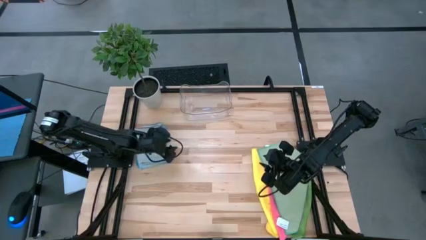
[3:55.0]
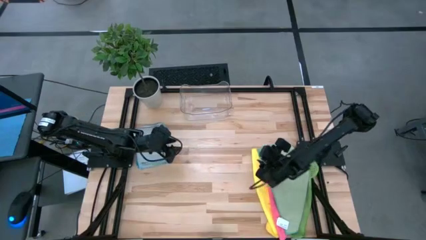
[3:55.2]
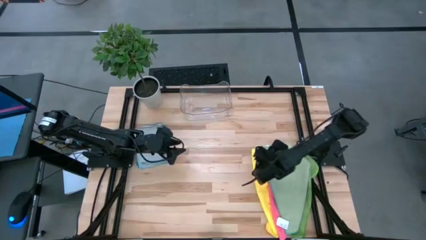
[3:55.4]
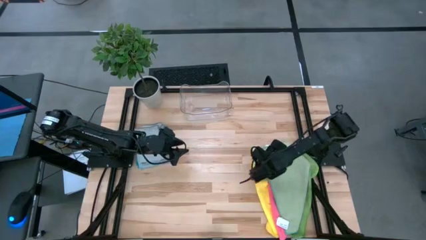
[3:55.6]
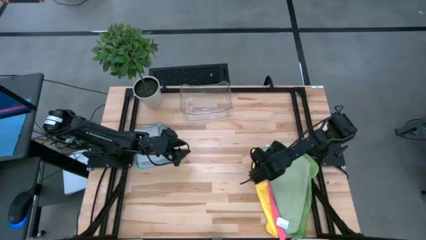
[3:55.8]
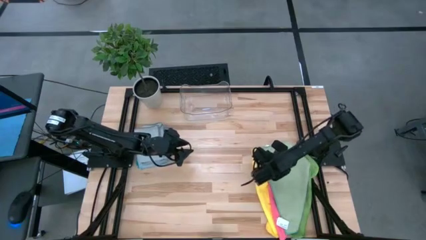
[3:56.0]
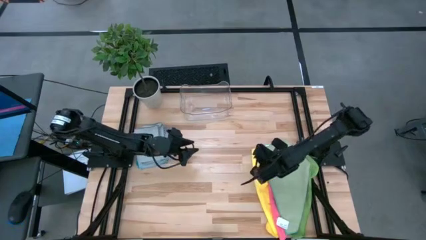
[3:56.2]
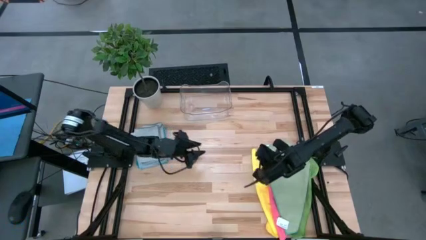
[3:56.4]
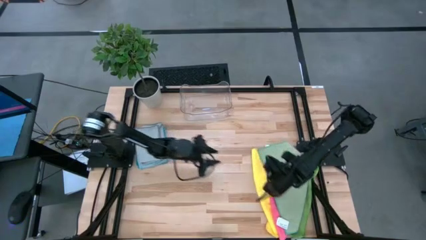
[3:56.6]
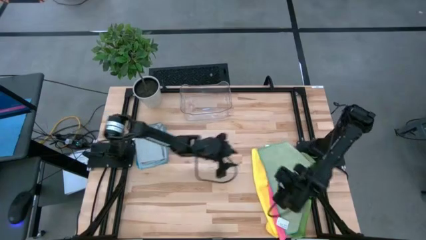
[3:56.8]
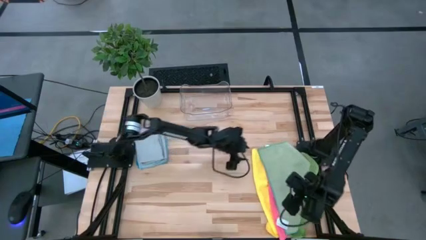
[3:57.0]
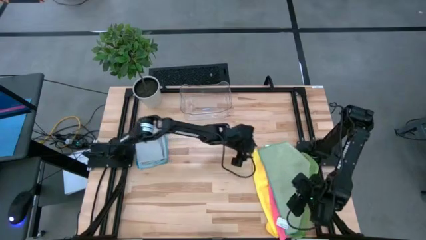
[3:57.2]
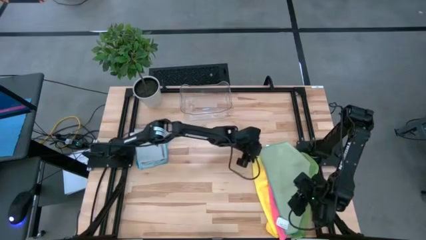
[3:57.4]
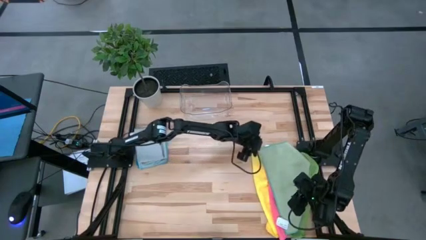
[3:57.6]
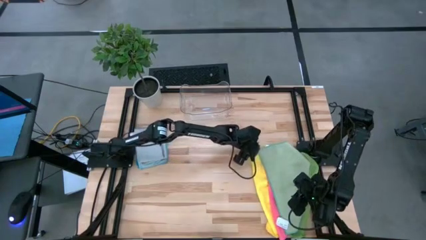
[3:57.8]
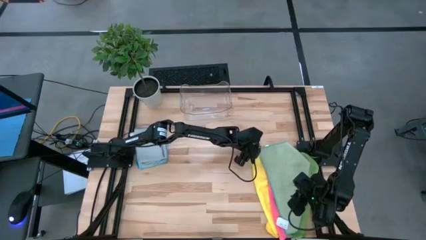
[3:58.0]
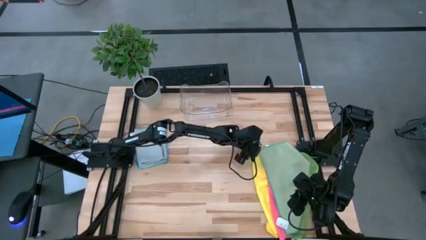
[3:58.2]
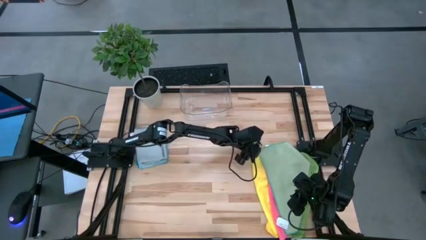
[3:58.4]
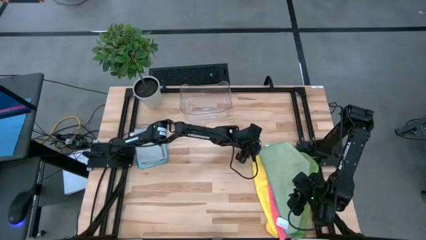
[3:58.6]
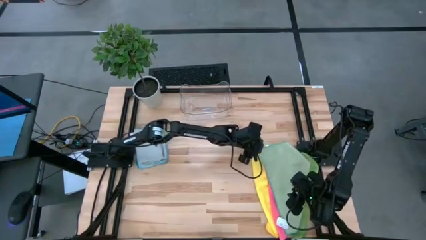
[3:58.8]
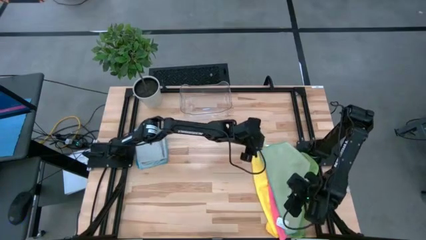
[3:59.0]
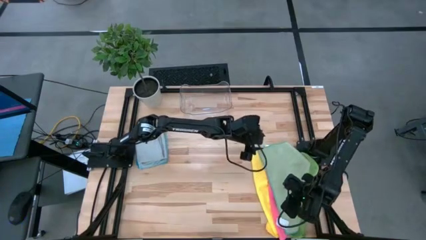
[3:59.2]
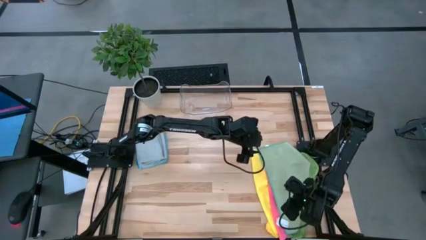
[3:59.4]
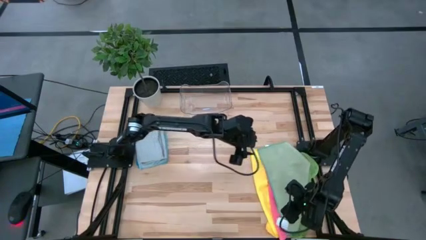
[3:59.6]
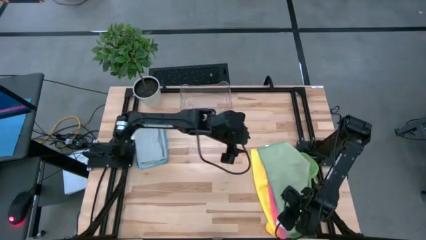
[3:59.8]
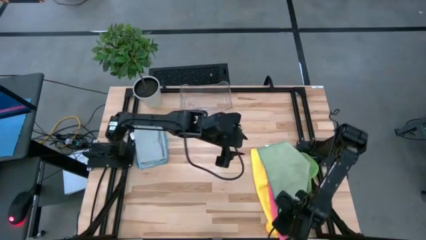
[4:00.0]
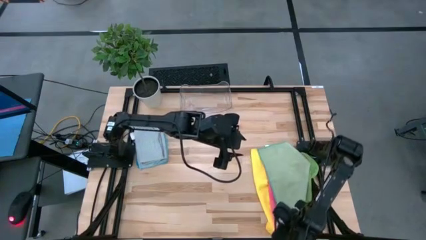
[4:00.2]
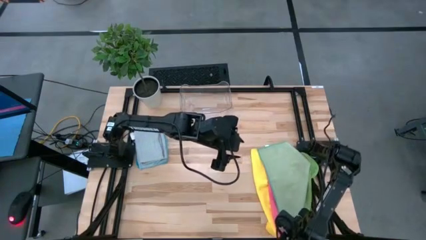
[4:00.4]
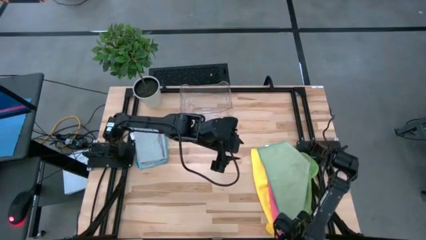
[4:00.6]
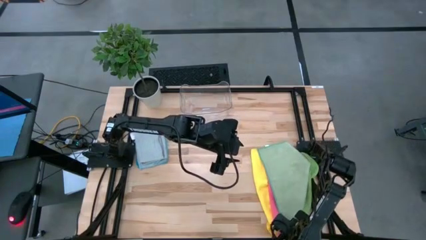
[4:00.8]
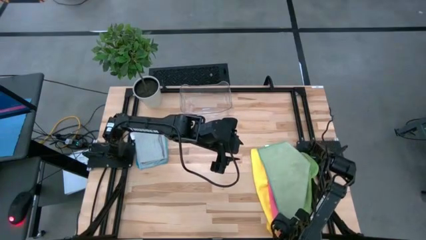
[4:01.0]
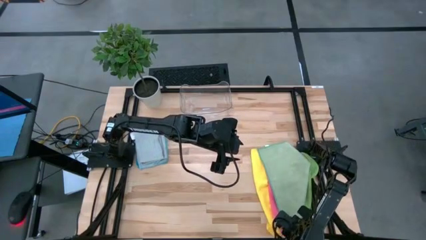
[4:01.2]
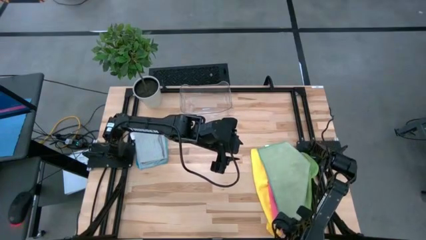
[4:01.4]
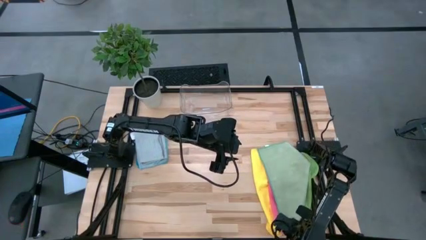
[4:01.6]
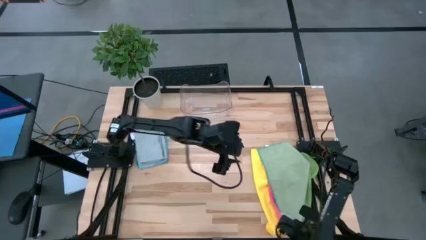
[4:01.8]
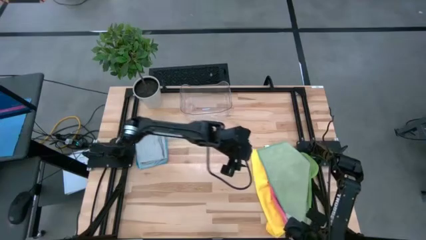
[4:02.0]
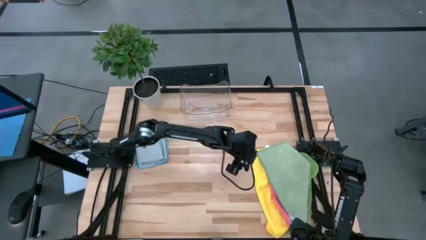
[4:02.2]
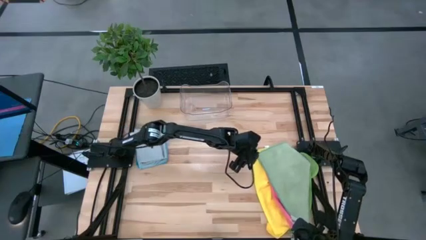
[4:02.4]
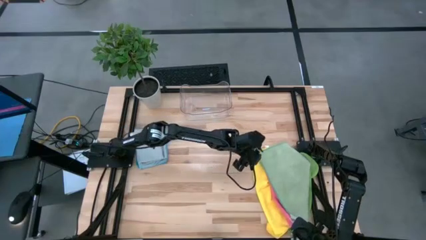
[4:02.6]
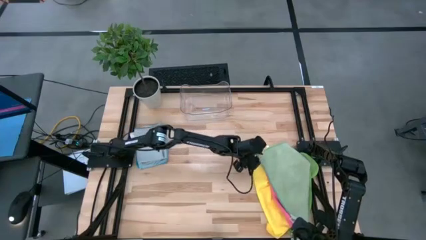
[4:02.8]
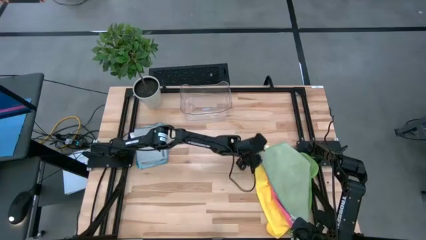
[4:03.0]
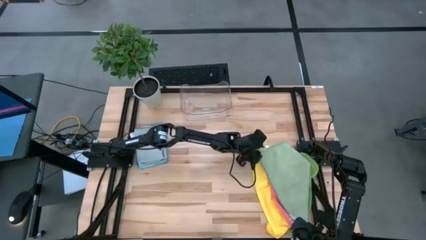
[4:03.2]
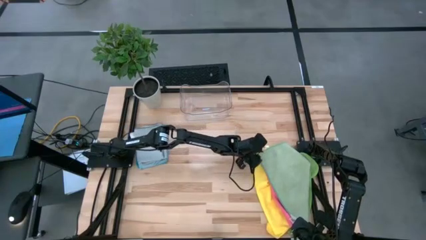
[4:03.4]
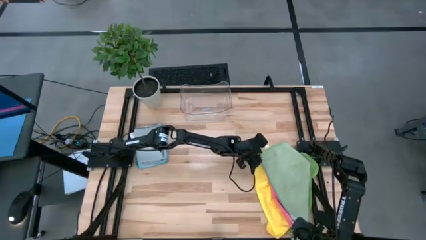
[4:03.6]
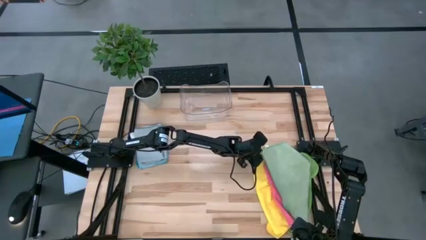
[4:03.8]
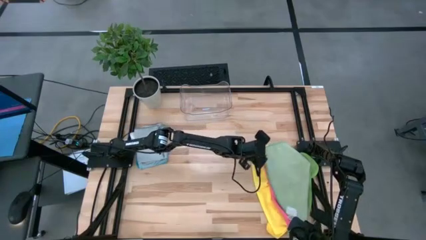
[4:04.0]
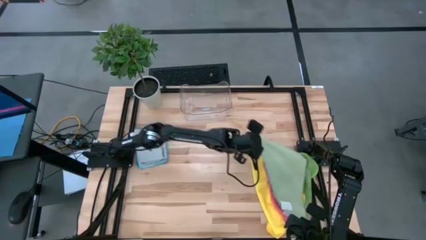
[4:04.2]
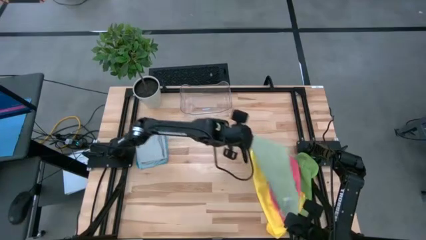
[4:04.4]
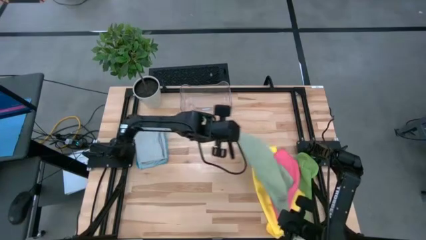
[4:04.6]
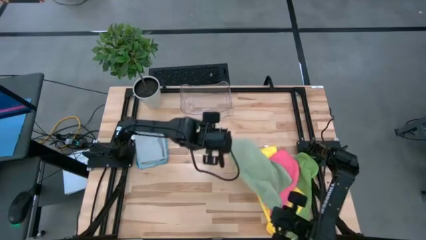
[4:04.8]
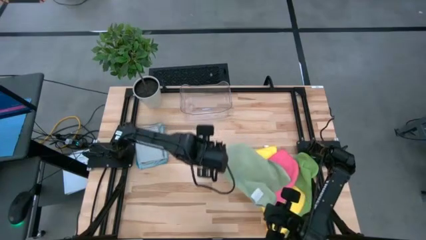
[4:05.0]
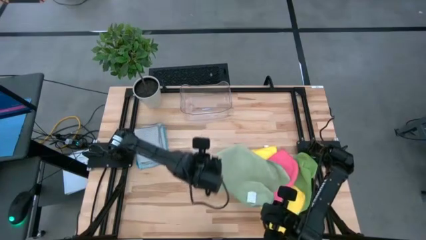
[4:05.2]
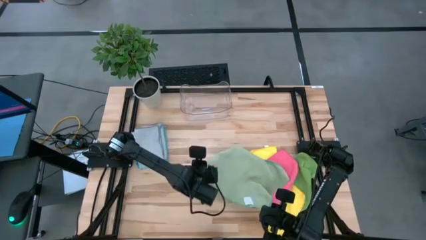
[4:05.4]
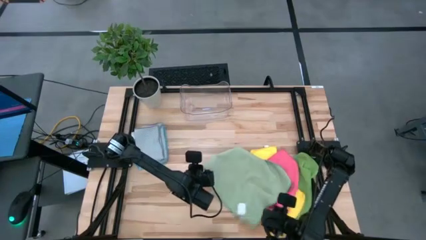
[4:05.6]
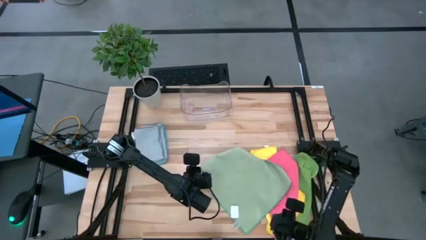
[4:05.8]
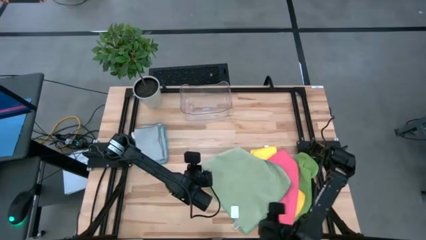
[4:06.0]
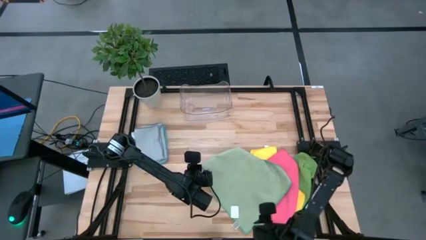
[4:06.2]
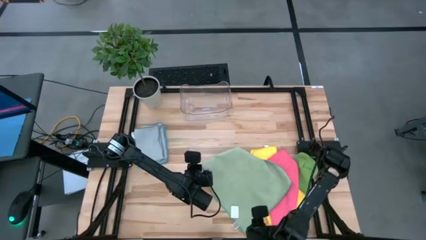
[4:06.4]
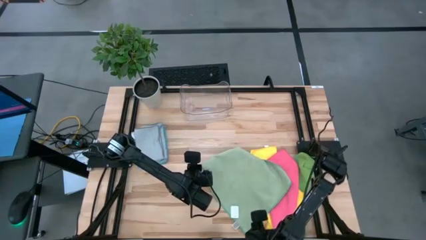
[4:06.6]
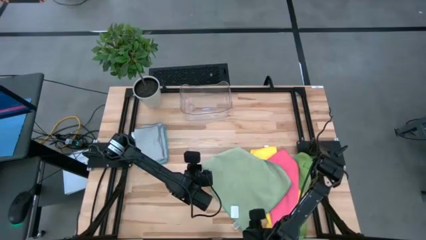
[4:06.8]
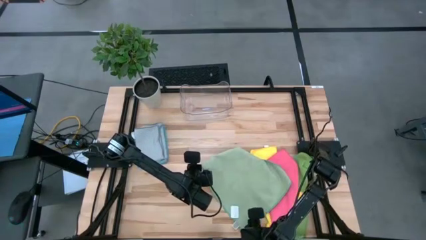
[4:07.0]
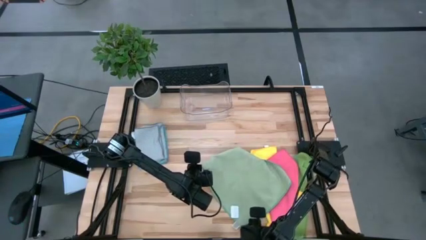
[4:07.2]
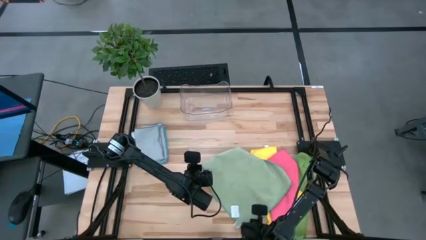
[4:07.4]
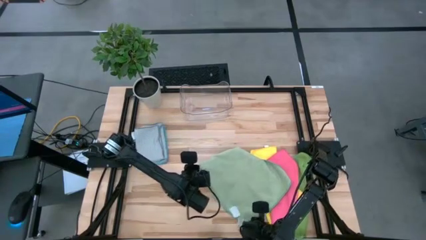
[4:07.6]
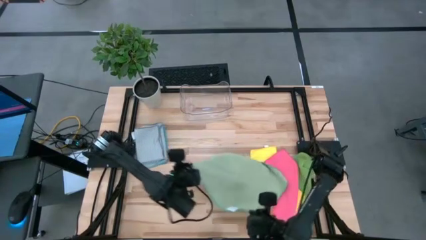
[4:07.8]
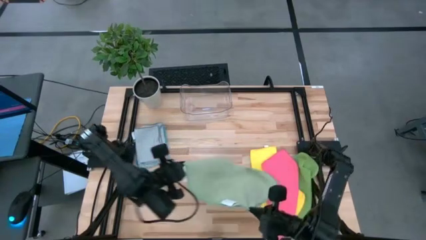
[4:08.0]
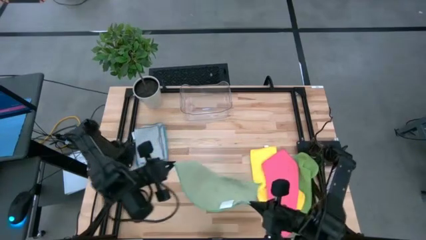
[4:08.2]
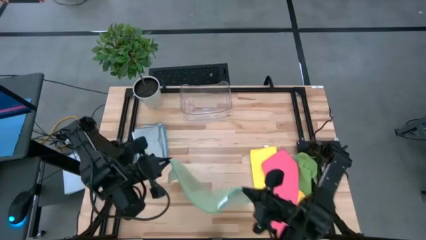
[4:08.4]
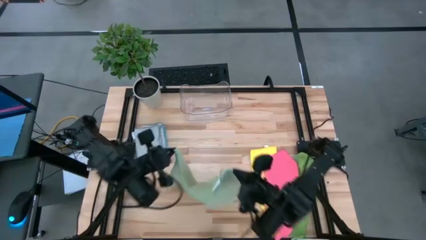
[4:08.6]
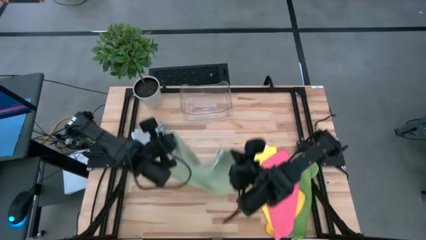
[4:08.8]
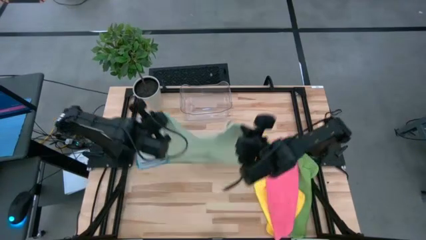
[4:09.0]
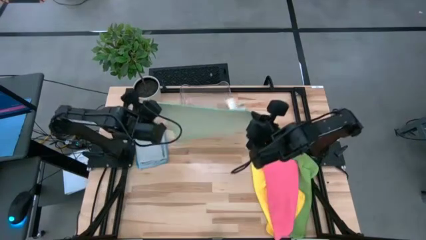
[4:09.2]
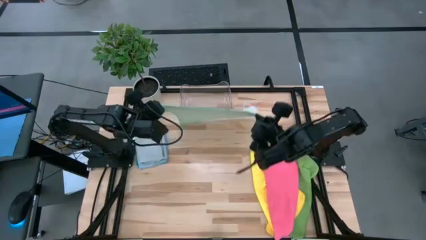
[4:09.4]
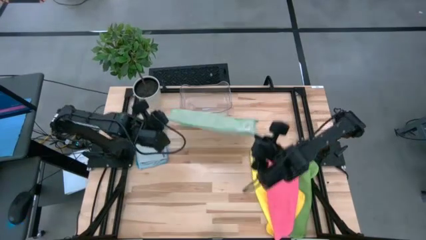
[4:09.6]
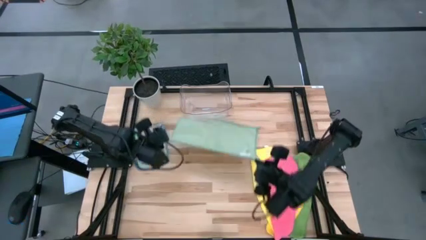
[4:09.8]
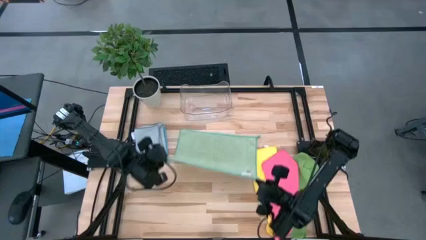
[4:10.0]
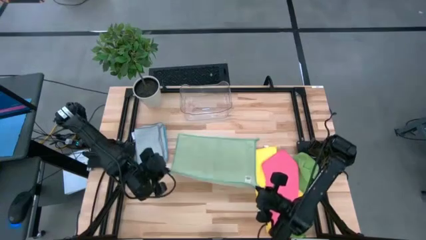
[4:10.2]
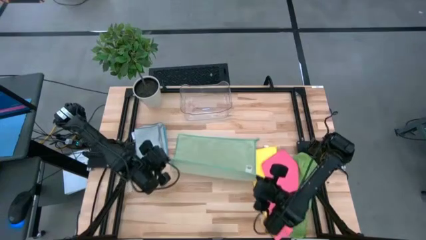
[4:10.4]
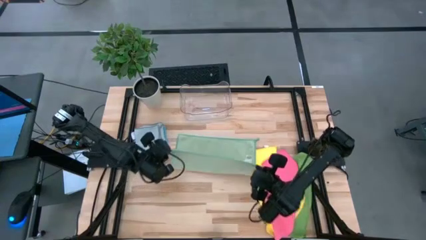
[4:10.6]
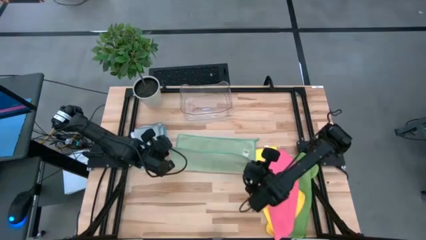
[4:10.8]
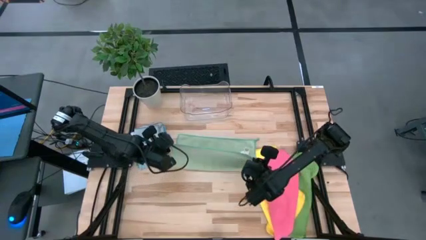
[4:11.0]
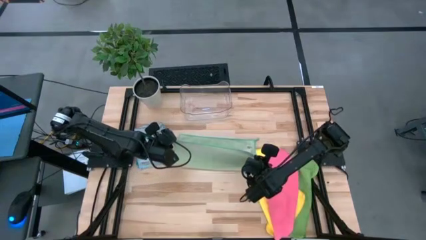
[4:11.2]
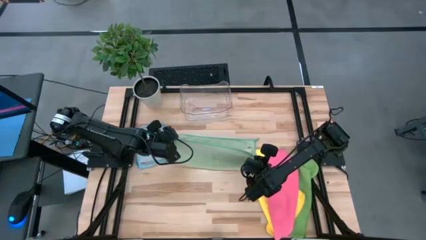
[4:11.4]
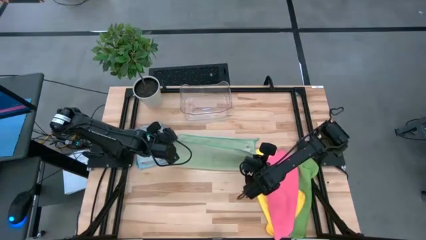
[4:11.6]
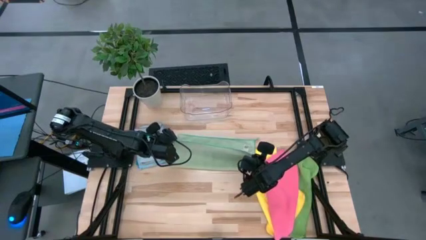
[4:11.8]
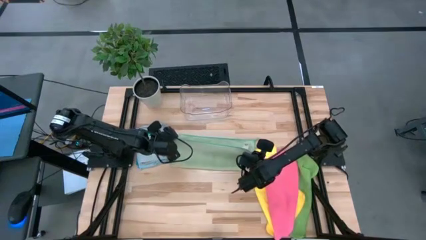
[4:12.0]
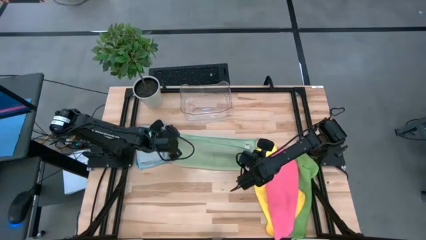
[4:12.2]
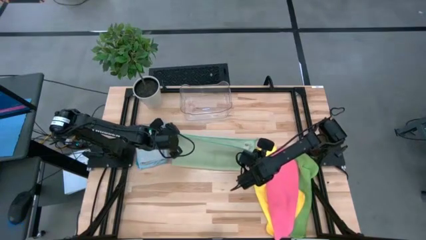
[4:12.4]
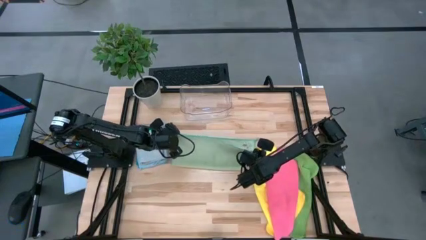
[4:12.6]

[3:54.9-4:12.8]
Task: Fold microfiber towels
Fold the light green microfiber cloth
